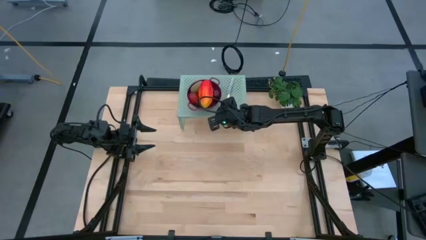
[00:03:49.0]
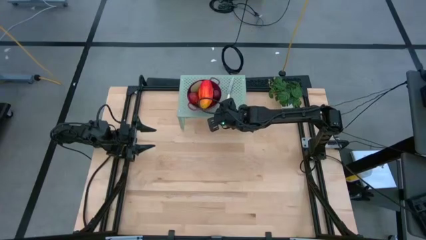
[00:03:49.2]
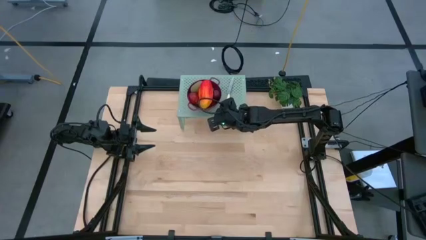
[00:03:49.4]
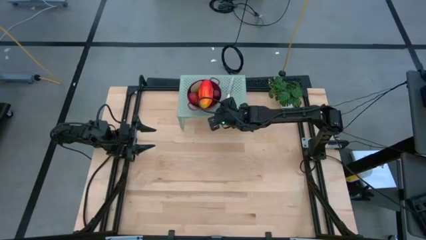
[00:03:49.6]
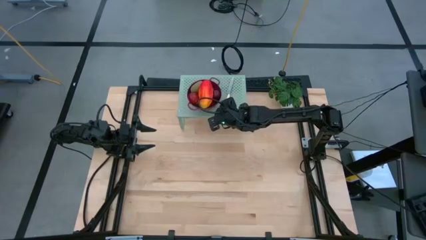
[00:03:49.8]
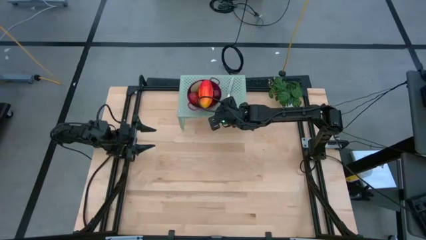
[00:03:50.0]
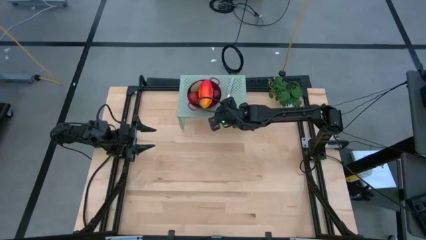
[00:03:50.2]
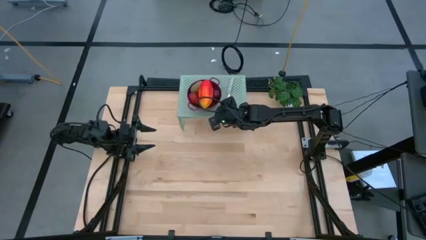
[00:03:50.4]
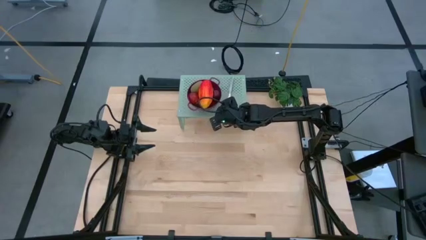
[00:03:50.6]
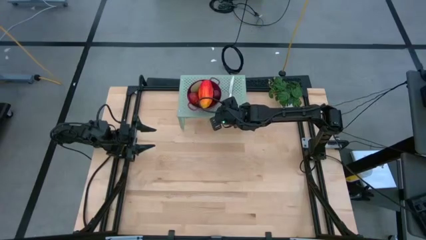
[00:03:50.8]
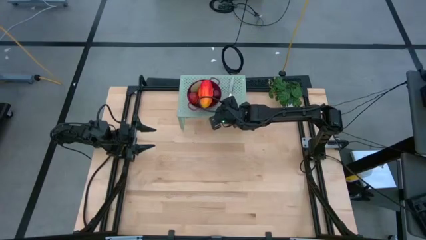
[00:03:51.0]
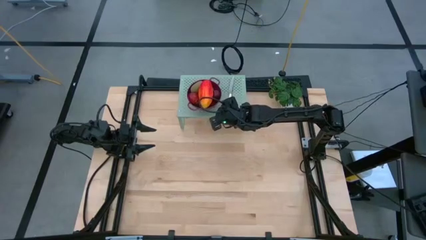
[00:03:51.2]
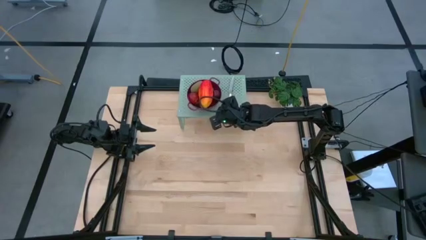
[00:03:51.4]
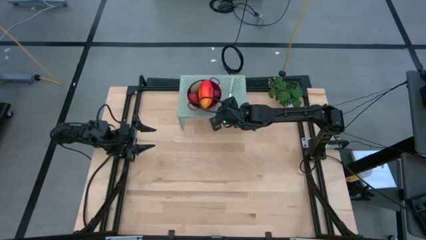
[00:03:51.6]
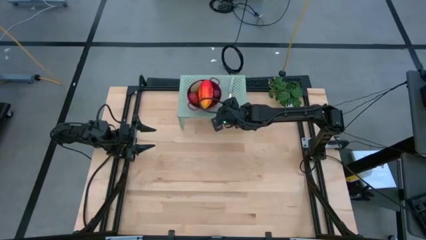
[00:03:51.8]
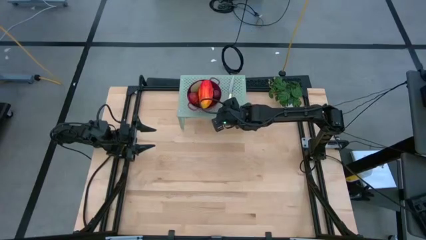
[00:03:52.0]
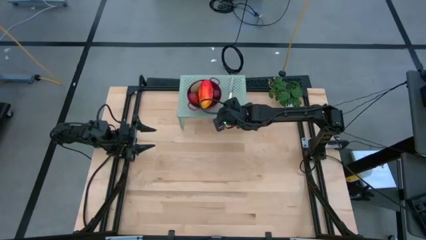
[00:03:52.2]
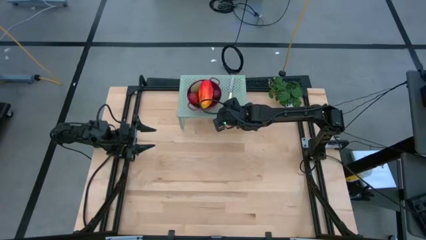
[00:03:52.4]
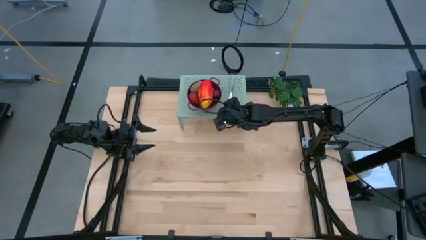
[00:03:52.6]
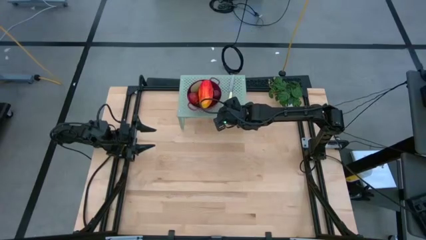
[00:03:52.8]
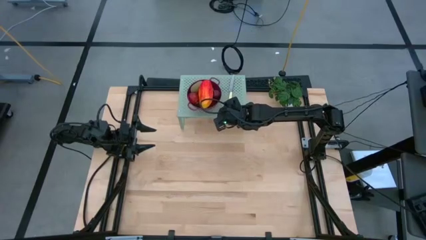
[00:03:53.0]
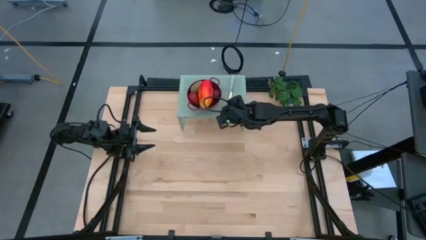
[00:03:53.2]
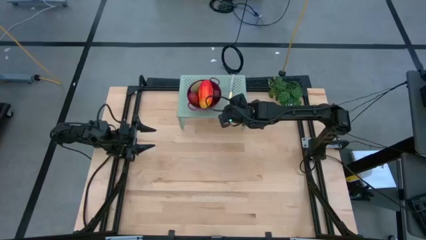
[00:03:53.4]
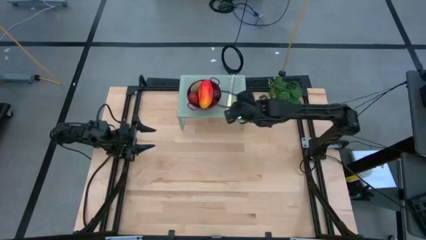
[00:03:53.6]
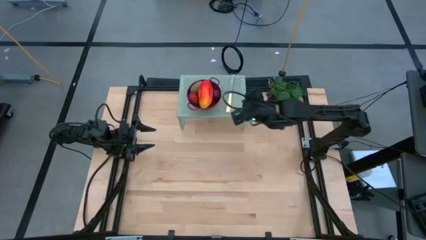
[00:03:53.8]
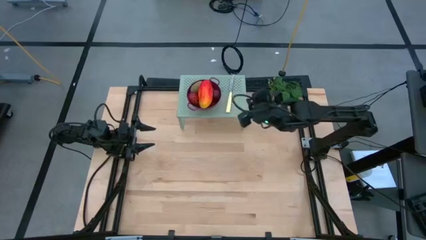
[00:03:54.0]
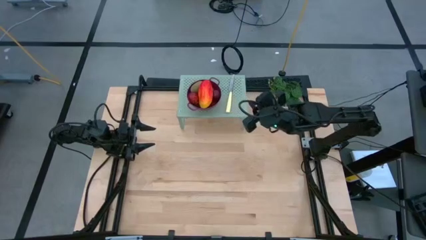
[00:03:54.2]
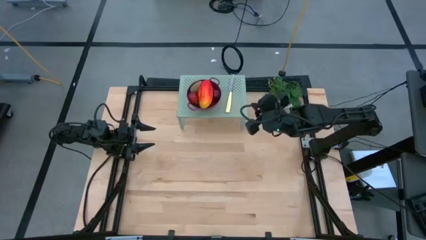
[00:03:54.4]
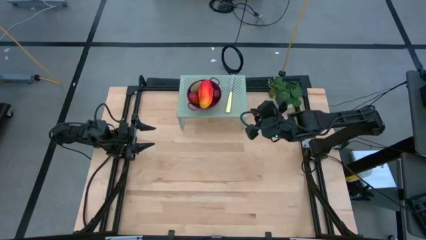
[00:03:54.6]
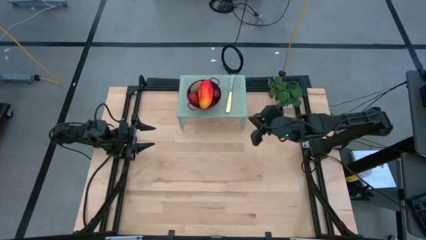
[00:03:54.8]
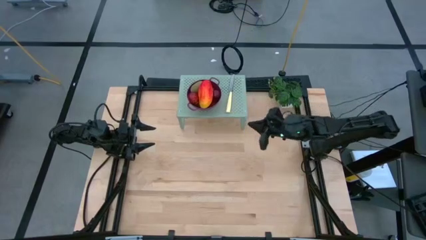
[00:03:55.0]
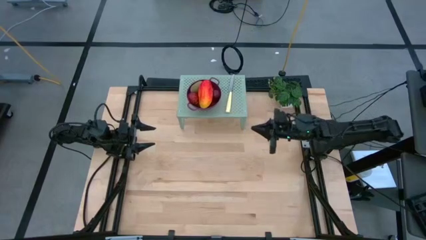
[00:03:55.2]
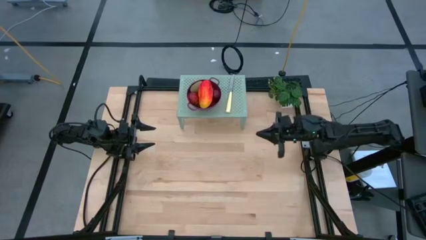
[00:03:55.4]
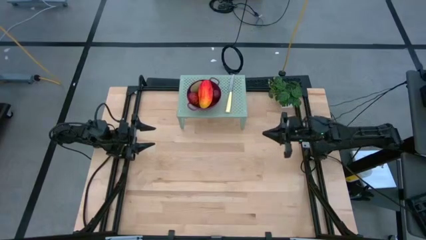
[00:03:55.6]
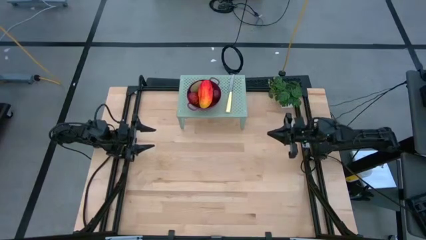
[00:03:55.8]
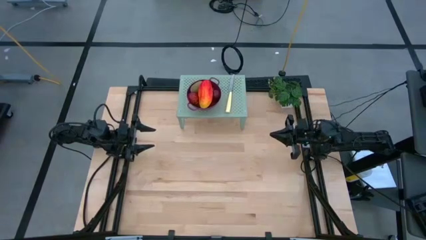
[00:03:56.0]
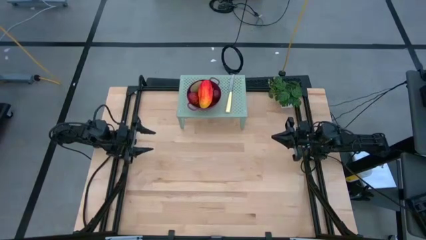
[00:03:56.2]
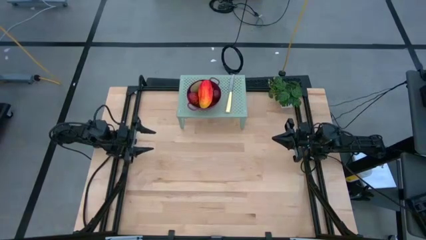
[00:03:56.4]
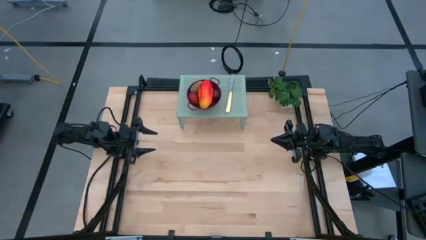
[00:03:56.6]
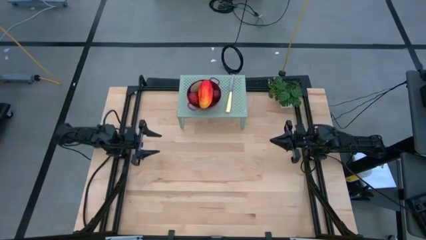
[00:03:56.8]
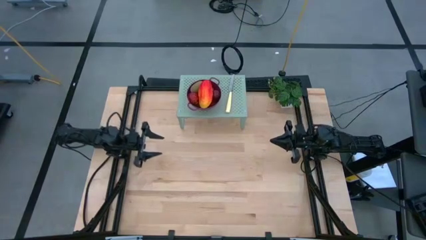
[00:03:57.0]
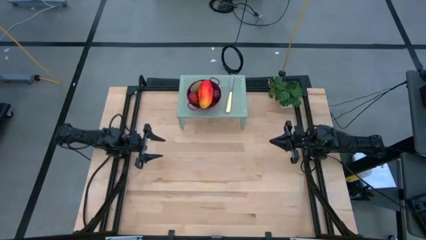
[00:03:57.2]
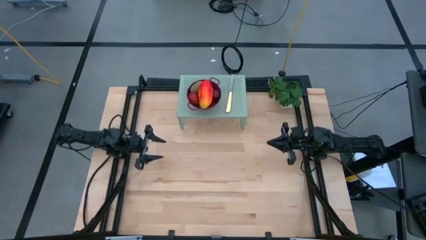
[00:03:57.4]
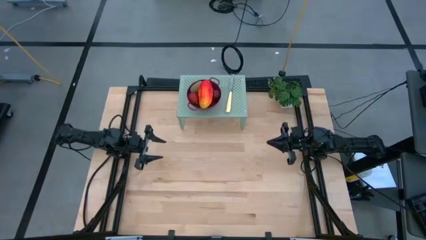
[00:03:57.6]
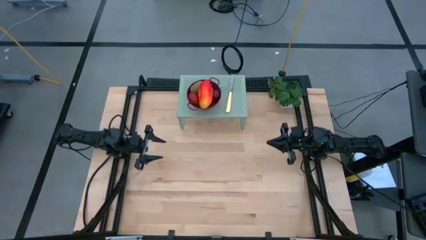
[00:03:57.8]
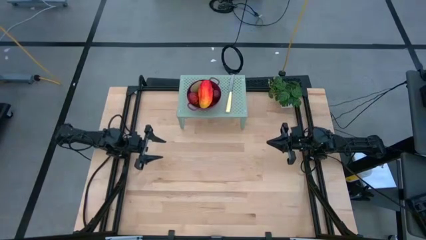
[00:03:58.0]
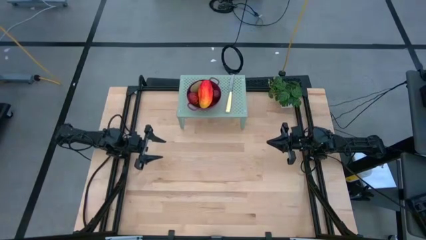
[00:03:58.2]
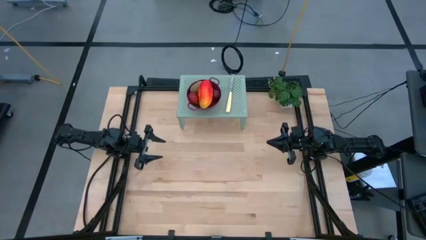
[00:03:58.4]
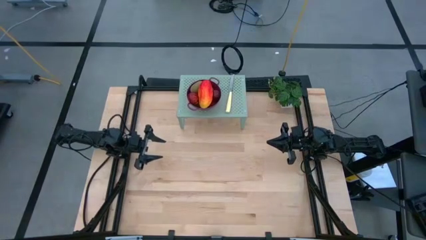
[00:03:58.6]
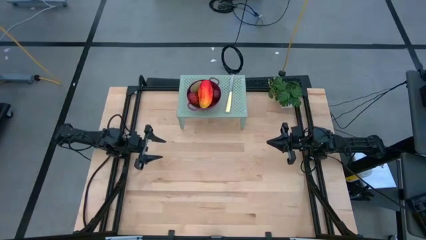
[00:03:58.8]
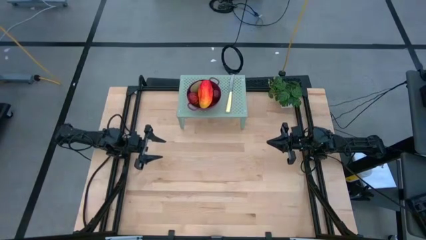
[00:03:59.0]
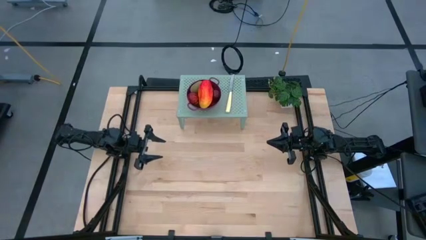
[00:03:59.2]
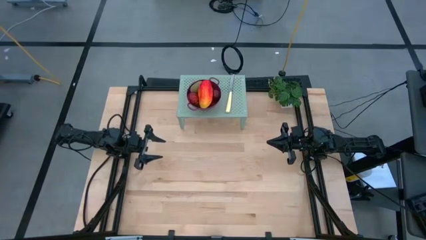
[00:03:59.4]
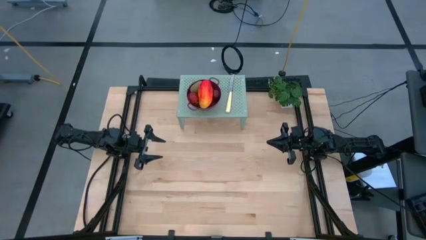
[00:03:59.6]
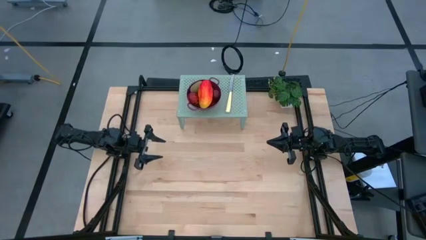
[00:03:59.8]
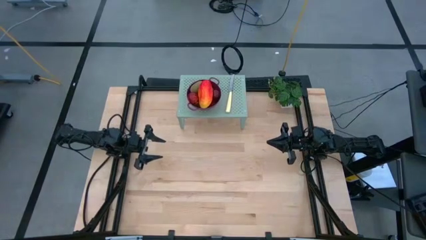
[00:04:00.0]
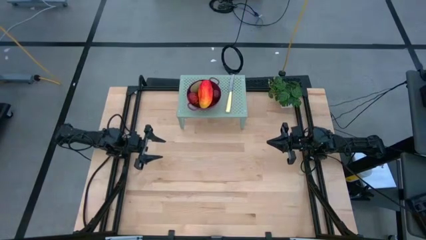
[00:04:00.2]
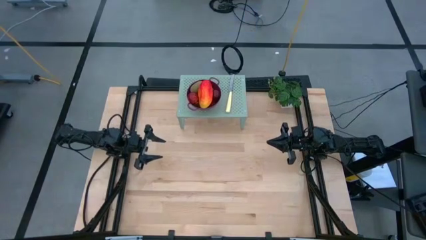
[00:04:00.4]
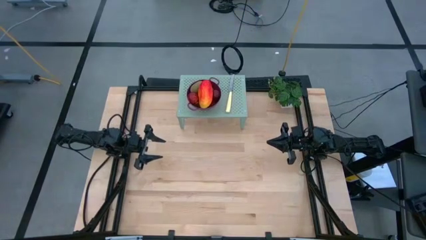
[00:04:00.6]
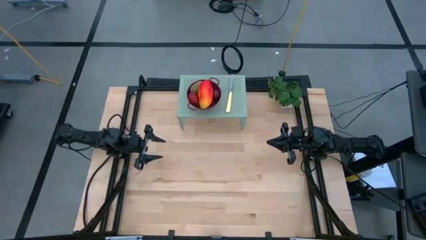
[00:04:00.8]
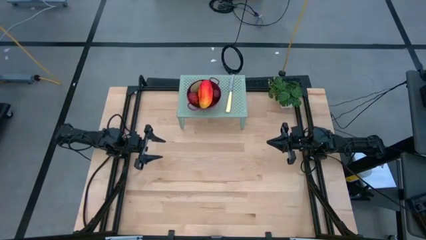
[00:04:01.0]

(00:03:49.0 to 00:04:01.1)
Task: Pick & Place Fruit
Return to Home Position
